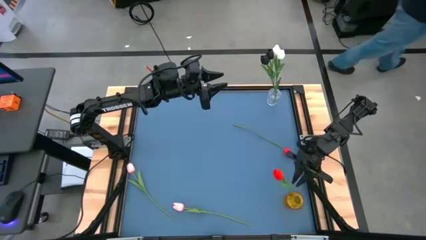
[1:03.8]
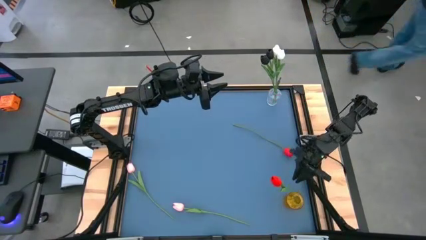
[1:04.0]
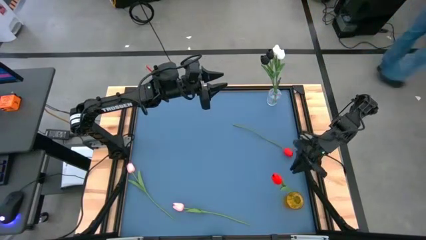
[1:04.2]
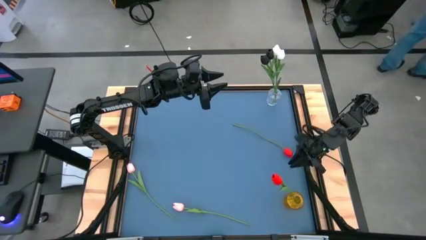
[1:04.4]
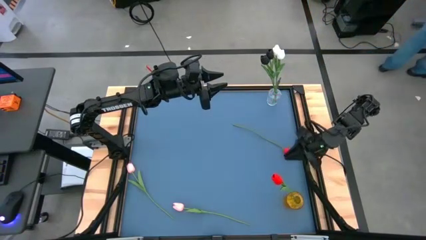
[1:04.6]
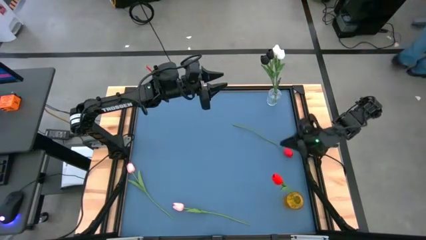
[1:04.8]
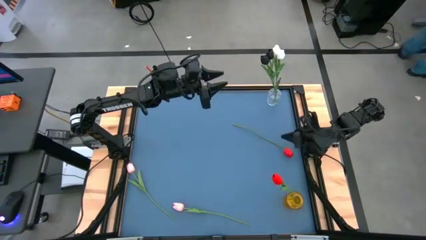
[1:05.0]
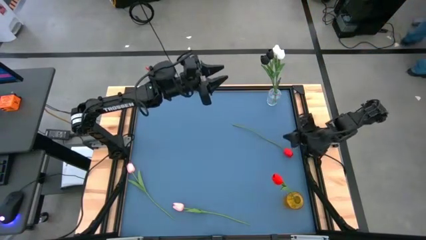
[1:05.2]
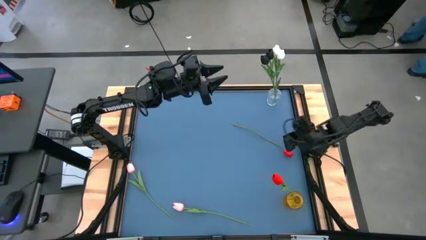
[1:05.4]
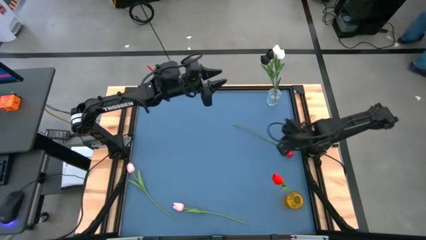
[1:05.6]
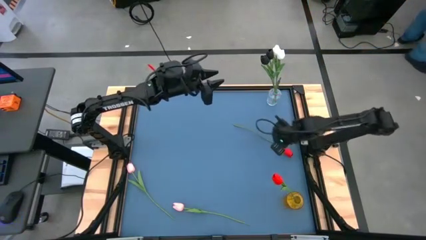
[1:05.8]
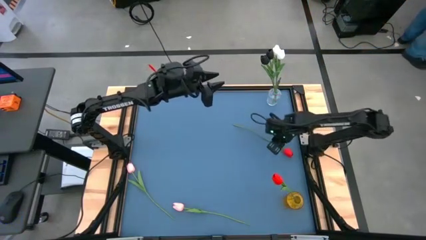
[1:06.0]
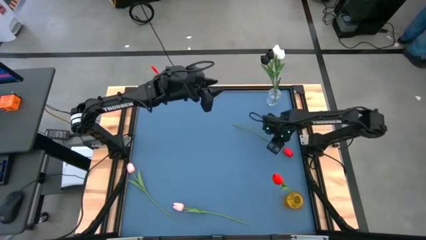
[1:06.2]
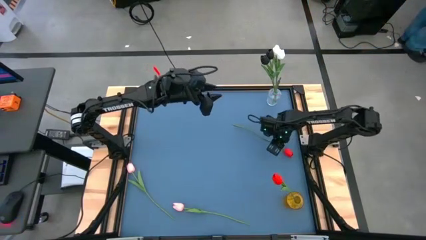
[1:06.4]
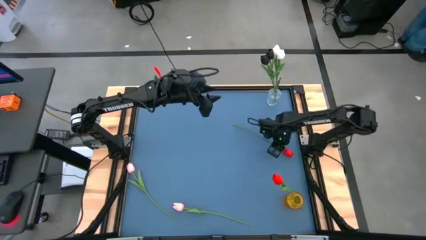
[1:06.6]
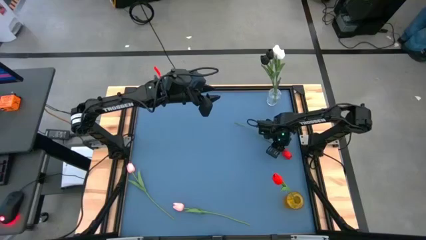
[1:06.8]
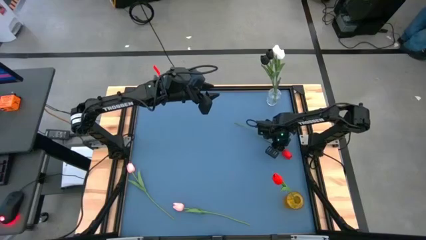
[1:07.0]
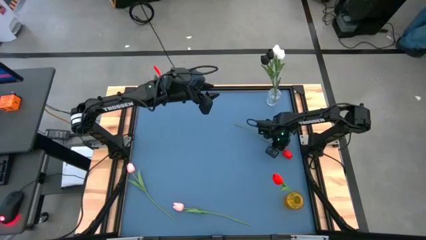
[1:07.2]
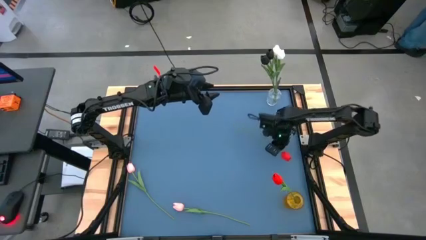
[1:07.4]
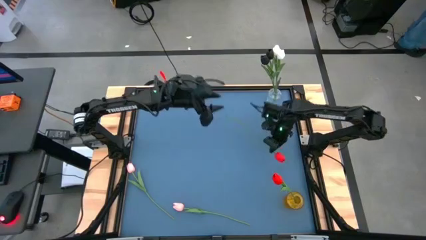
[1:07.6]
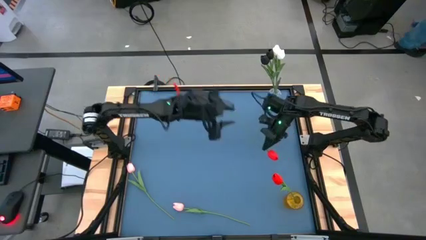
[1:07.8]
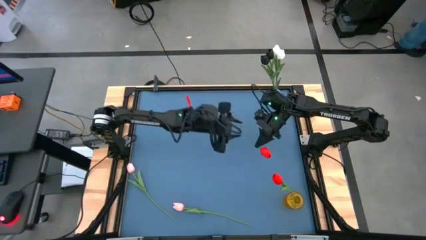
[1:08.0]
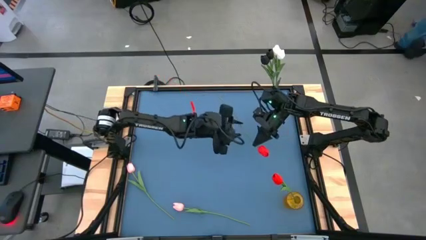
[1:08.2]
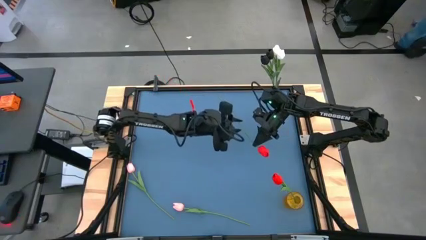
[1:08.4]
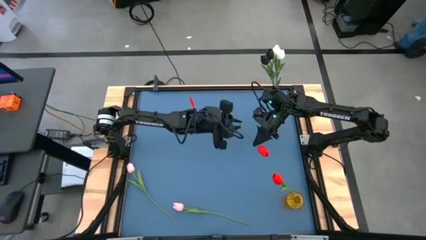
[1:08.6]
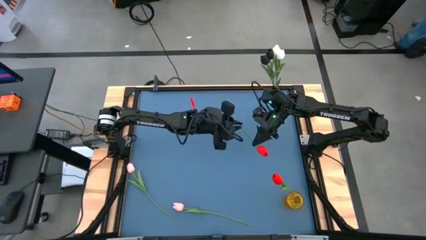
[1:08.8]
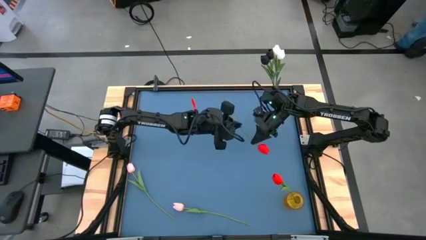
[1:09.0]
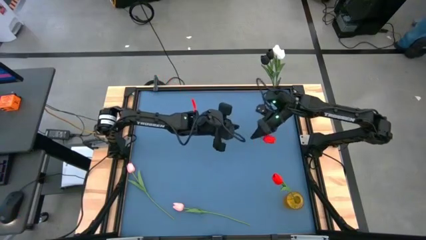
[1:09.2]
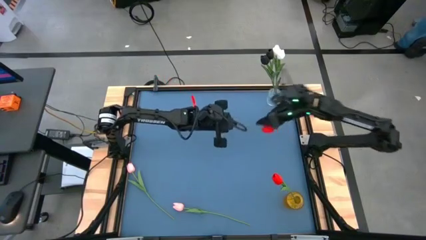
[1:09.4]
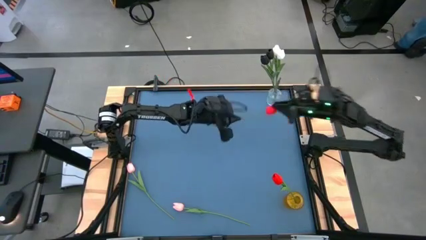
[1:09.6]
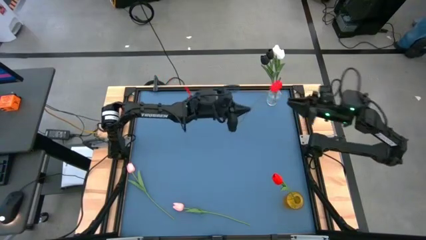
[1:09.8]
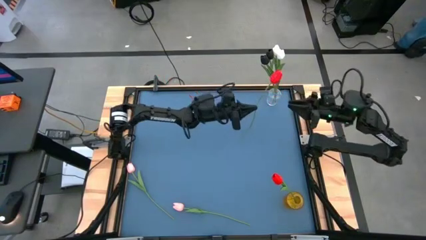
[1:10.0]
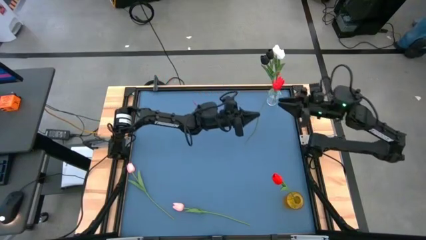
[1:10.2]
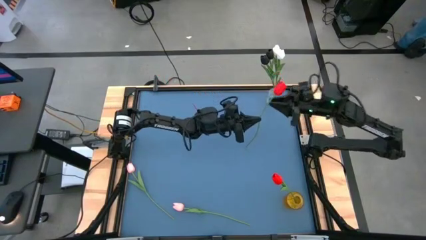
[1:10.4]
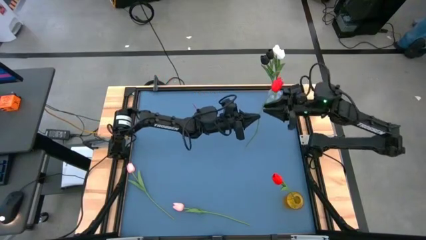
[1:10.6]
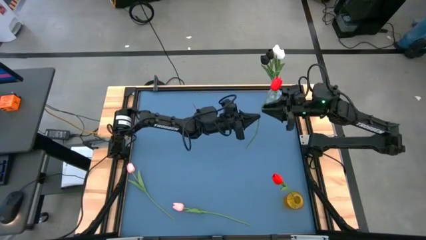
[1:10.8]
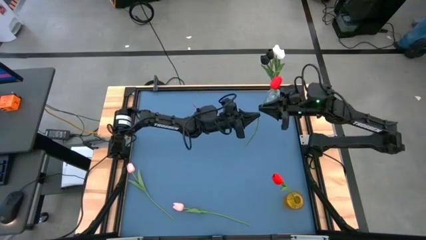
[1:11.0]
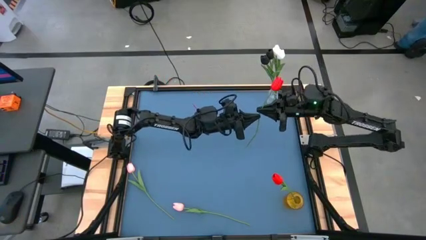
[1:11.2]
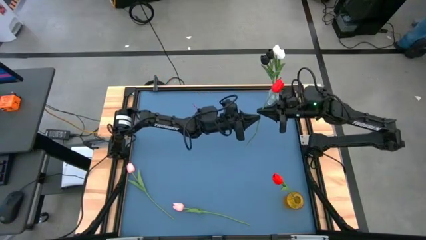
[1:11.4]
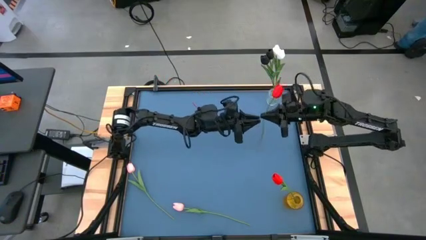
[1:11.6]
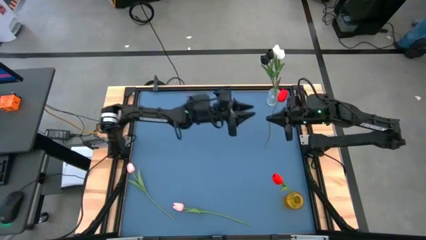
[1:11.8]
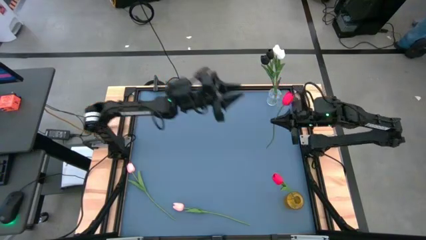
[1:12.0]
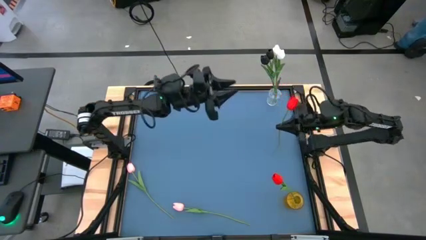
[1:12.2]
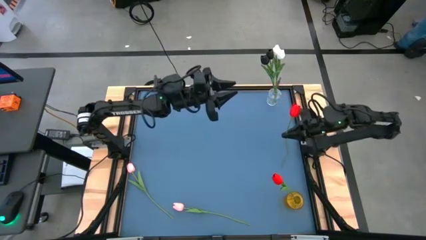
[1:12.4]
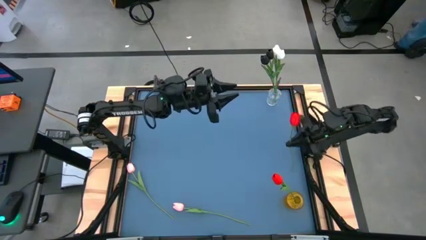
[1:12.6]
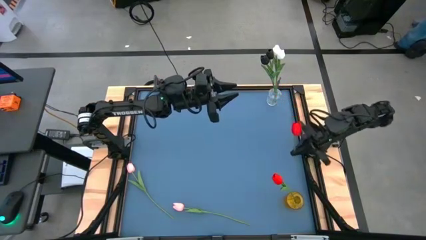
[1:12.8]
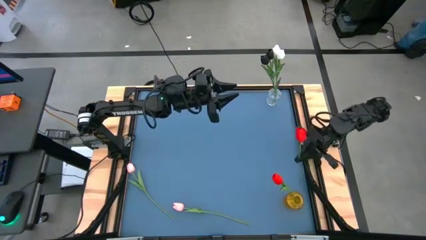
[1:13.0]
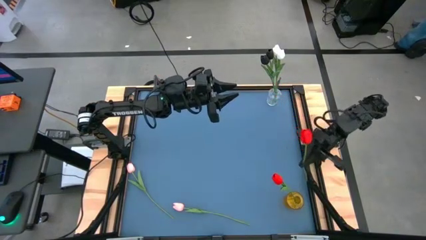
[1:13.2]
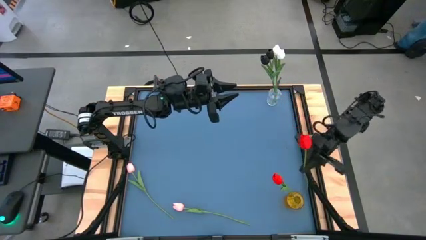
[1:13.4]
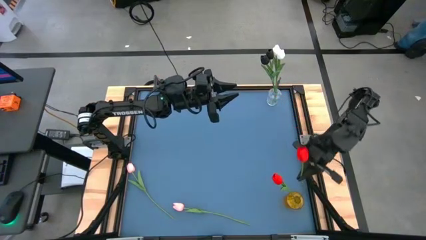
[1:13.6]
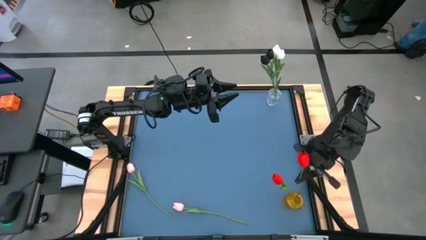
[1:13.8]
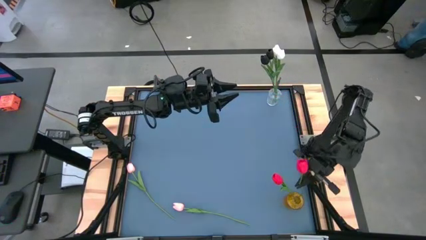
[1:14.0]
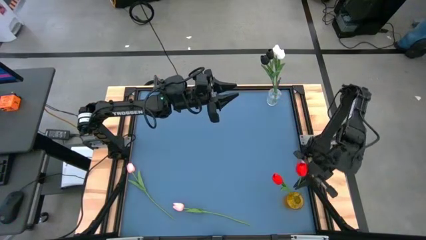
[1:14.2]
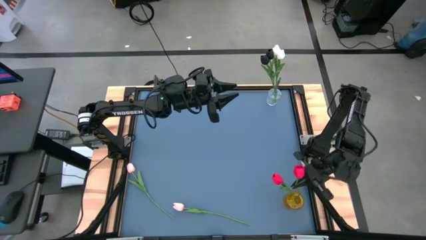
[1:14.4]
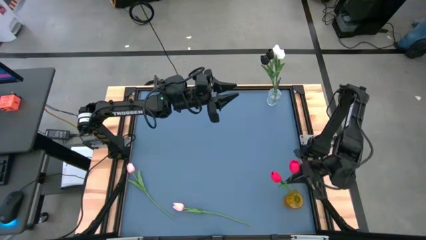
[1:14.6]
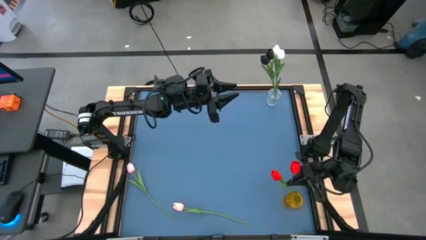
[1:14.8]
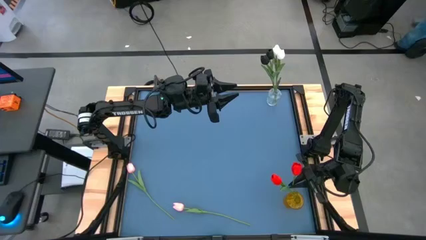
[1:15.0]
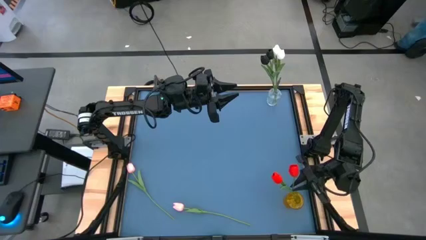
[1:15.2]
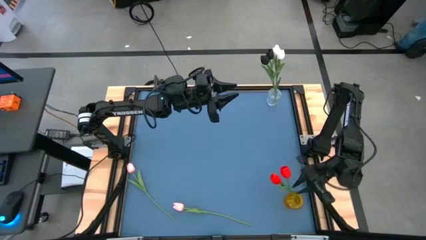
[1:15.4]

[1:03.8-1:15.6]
Task: Sort flowers into vase by color
Put the red tulip into the yellow vase

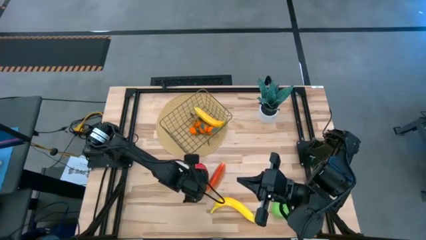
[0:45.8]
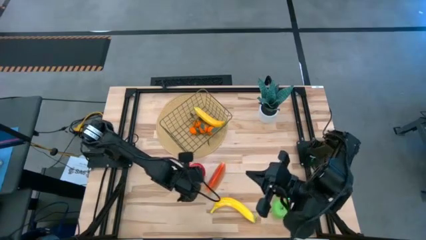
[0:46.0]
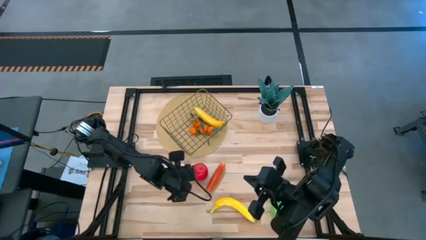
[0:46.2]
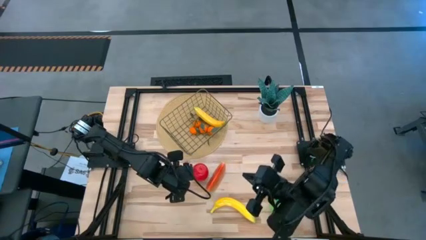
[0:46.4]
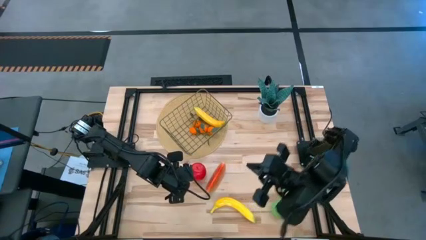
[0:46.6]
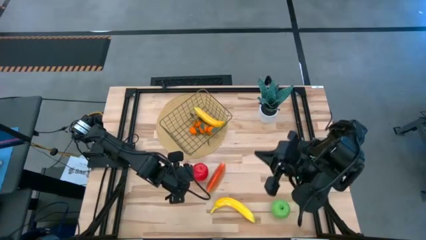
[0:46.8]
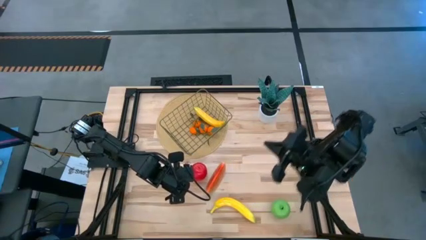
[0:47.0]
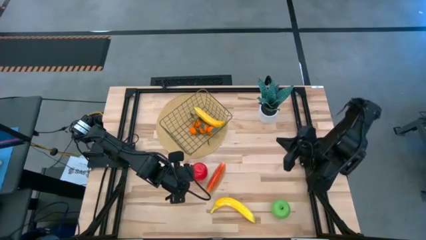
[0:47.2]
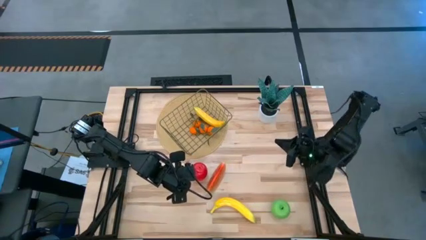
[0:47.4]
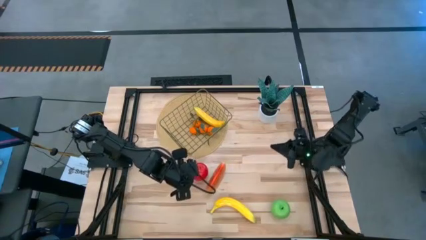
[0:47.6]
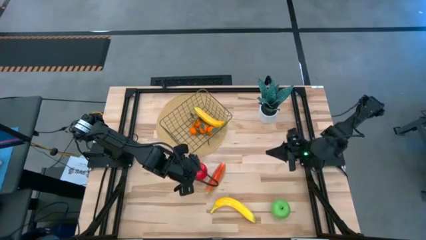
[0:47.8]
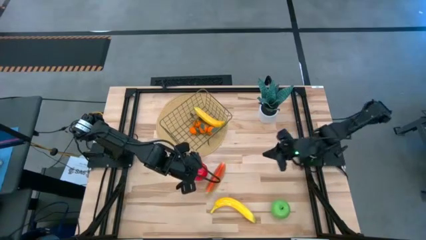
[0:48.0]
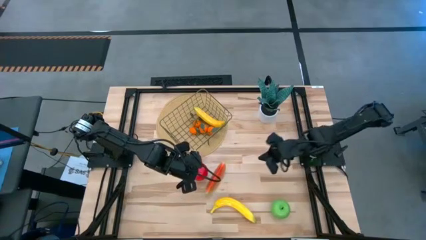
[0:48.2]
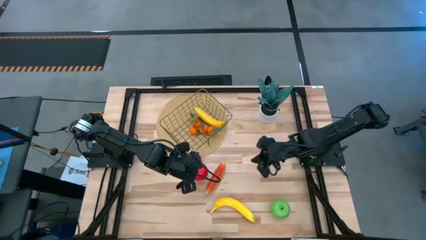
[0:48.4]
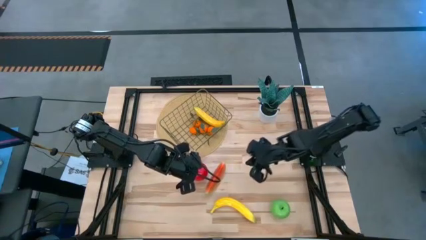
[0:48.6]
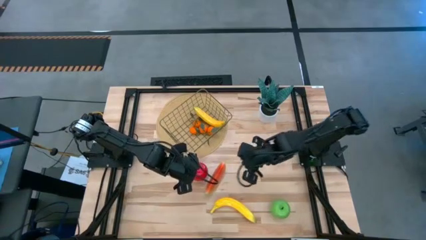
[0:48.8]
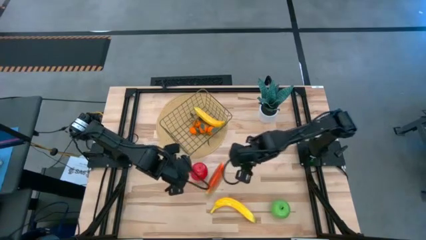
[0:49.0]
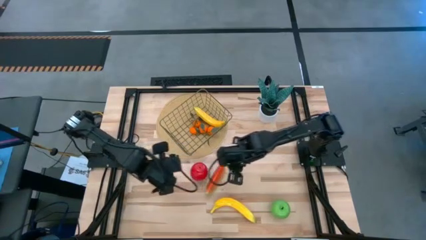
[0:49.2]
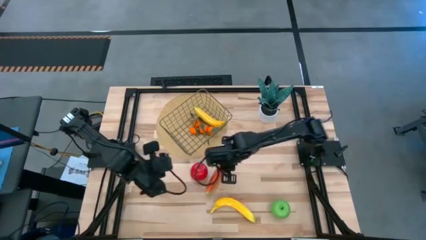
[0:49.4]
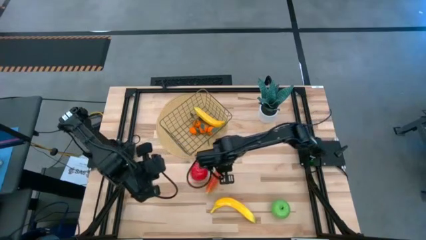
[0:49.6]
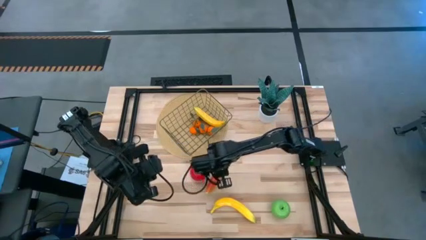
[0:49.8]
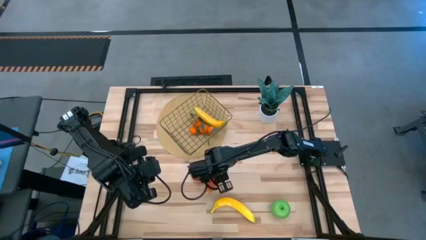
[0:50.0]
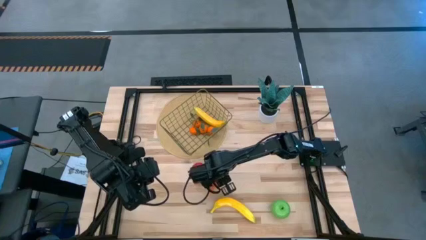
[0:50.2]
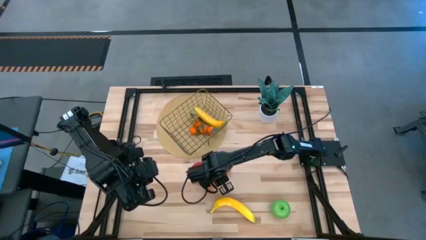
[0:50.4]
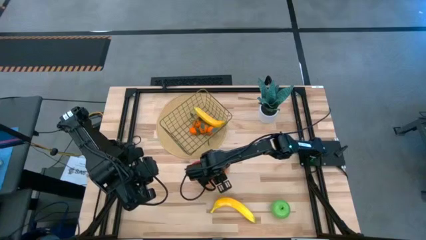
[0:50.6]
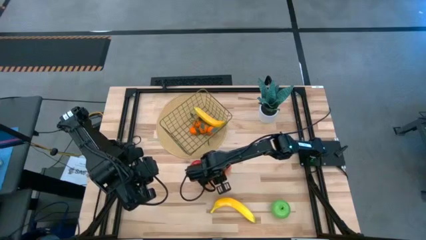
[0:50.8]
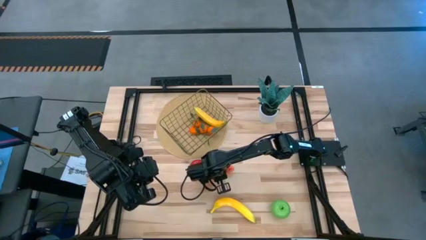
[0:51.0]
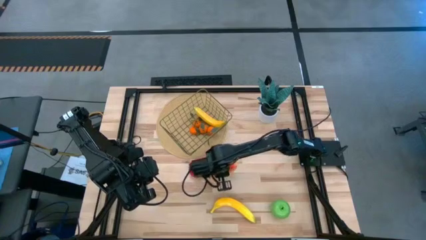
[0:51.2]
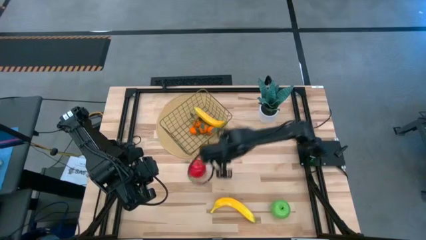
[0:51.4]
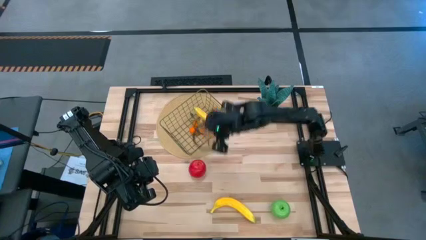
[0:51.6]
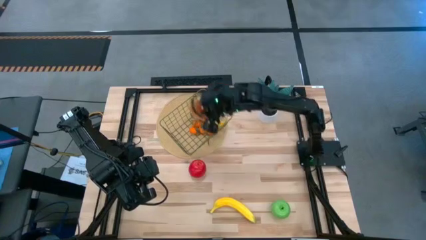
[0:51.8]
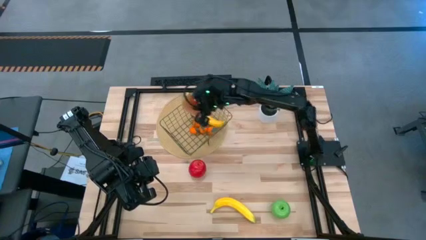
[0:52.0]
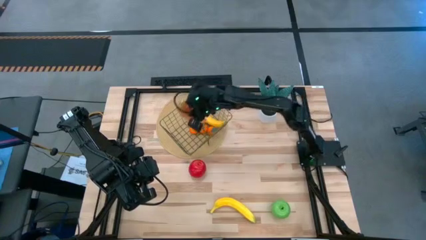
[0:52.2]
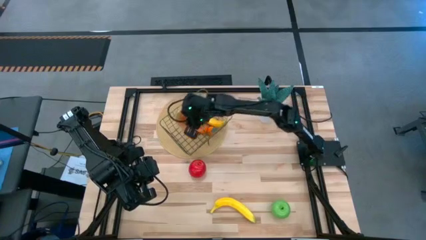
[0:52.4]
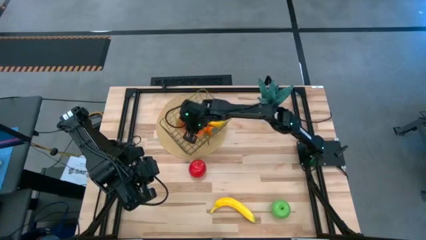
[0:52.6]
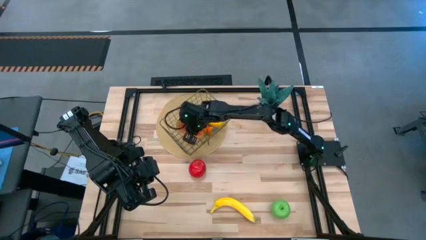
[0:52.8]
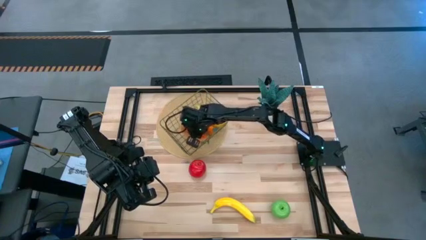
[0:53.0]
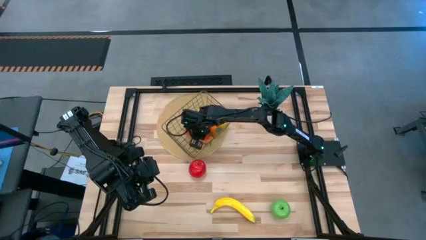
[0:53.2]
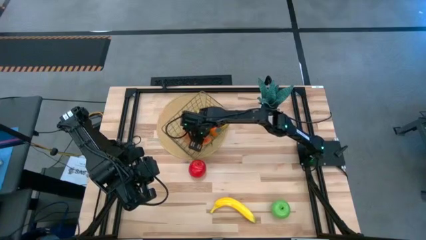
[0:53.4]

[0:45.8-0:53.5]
Task: Build produce basket
Put the red watermelon into the wire basket
